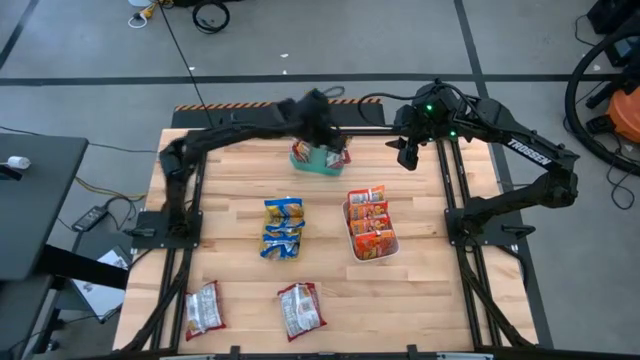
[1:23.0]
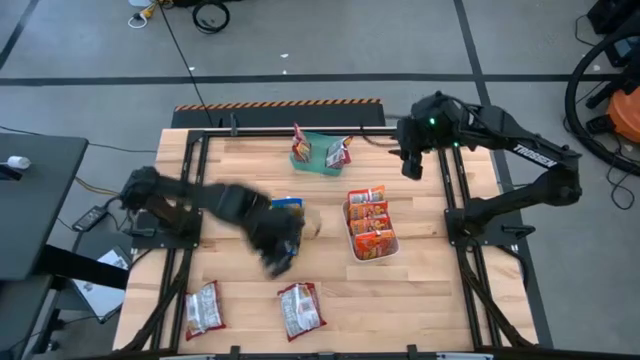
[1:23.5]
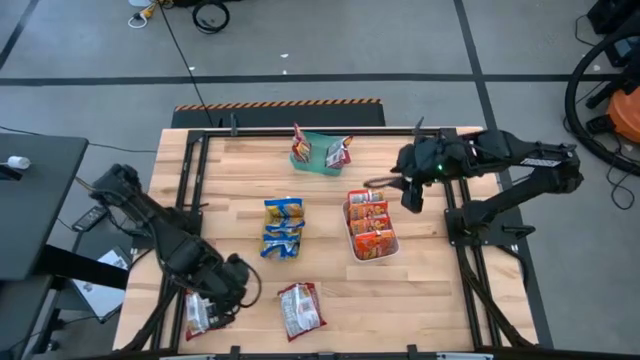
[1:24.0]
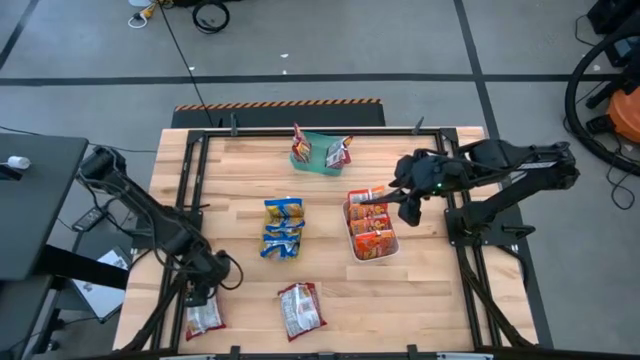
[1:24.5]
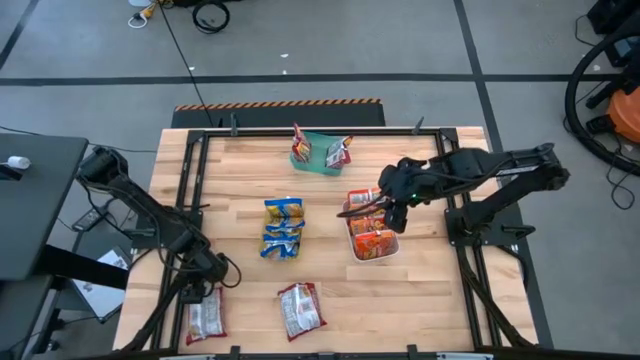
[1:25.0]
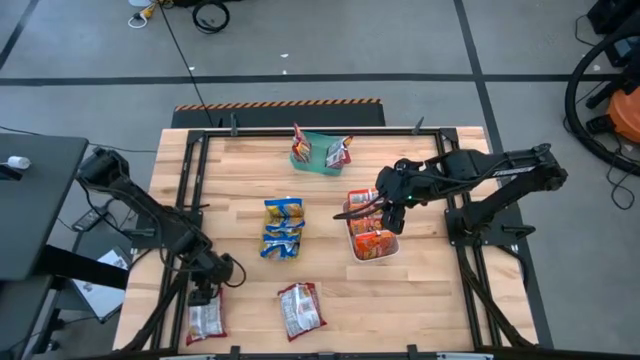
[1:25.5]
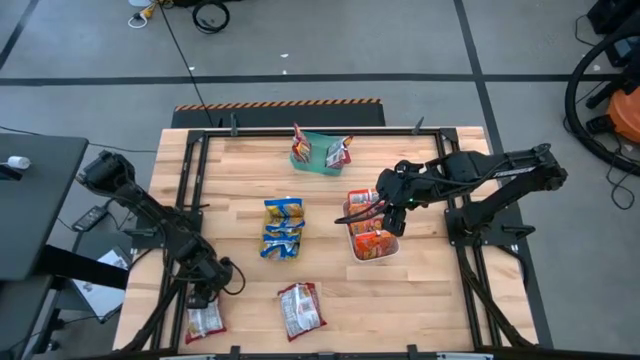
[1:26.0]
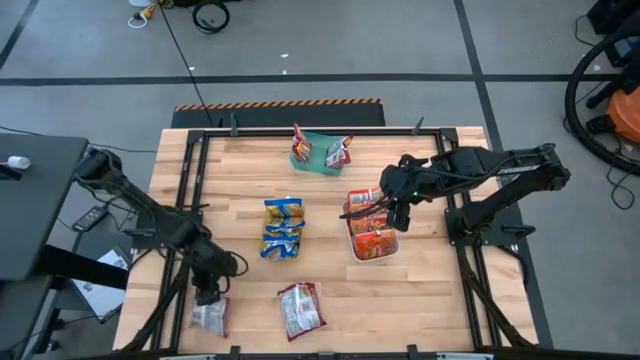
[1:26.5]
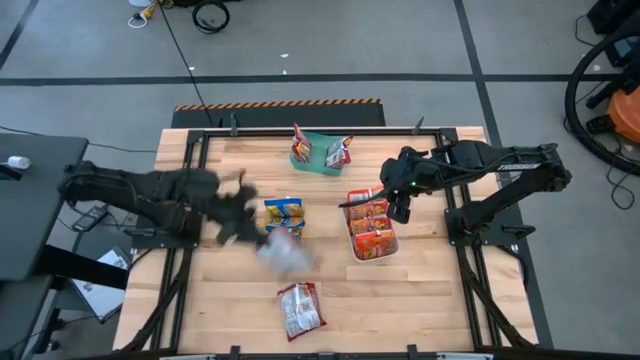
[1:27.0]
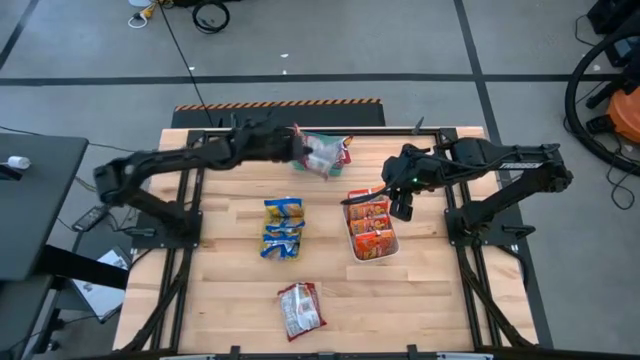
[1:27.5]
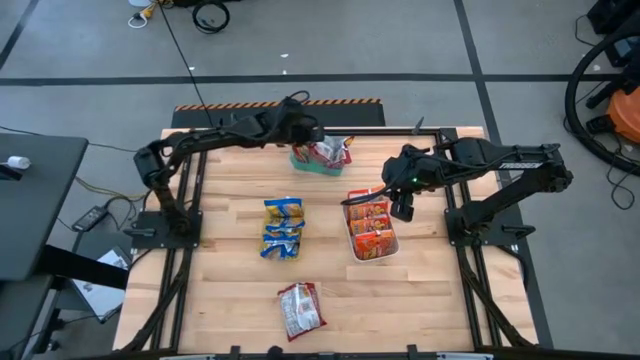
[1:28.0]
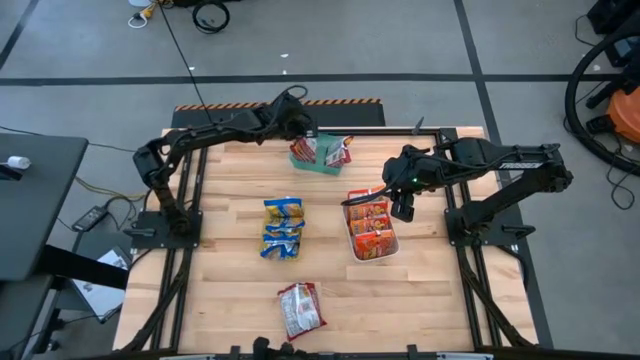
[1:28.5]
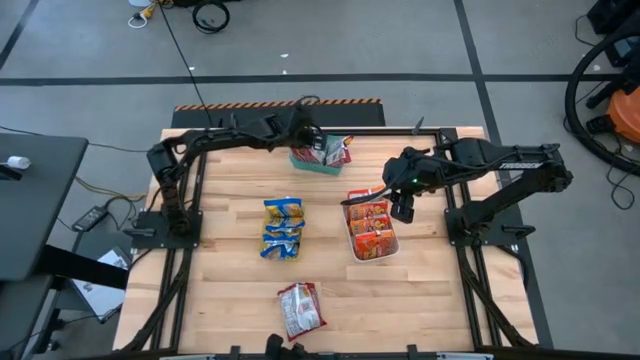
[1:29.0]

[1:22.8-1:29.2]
Task: Sort Maruchan noodles
Put the left orange noodle pack into the white bin

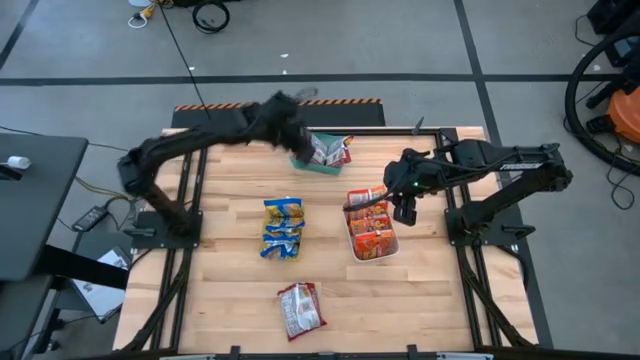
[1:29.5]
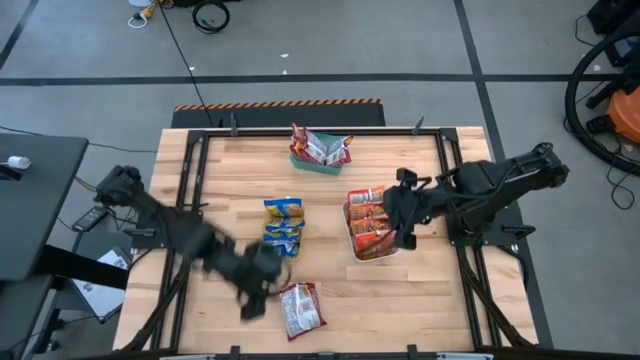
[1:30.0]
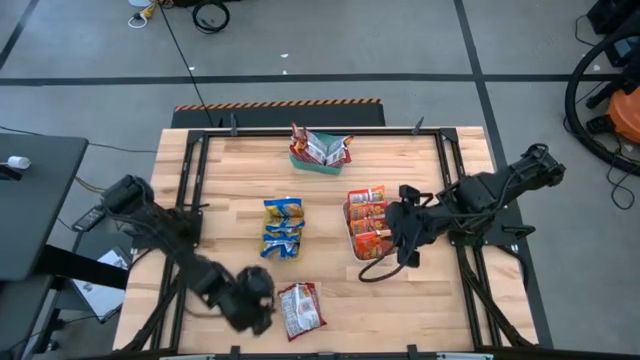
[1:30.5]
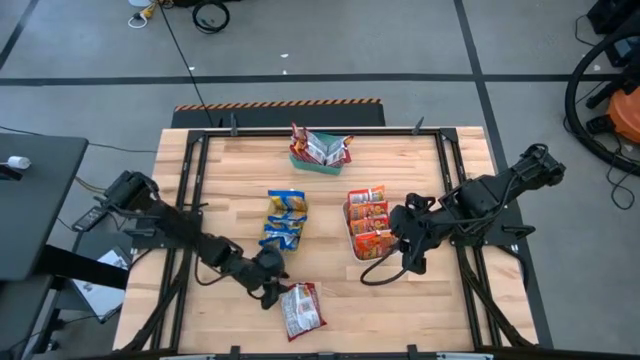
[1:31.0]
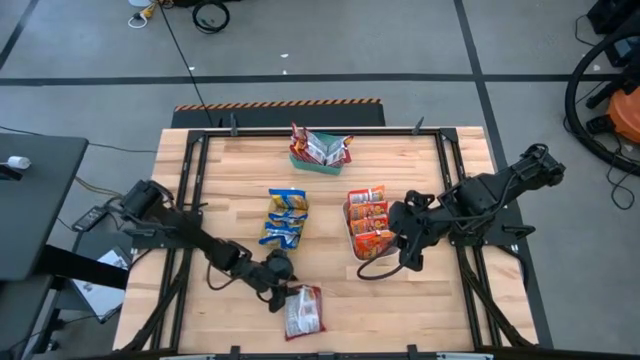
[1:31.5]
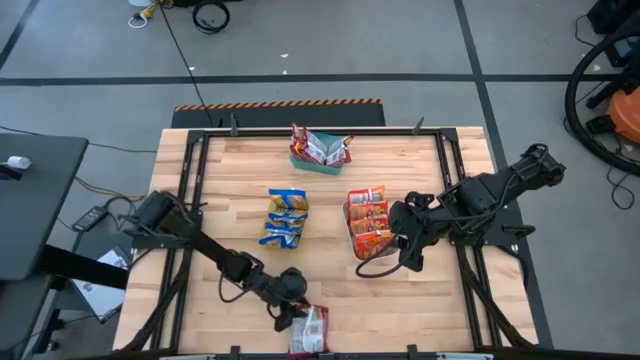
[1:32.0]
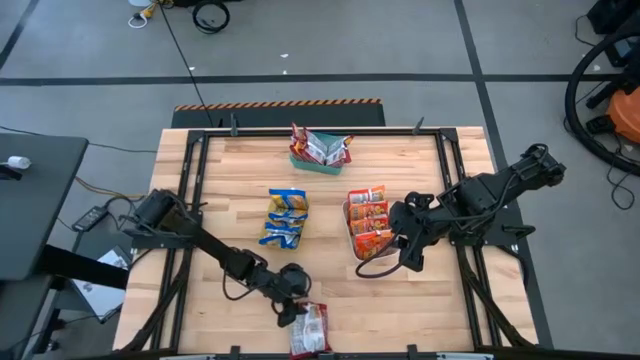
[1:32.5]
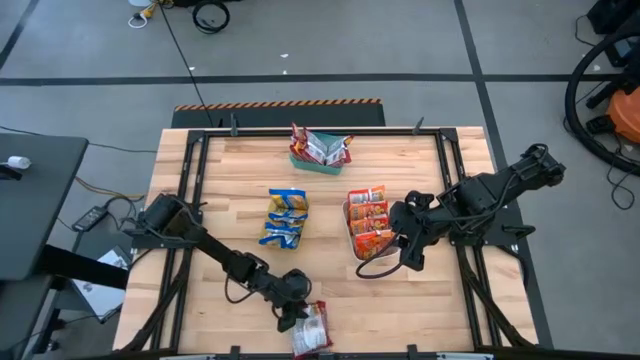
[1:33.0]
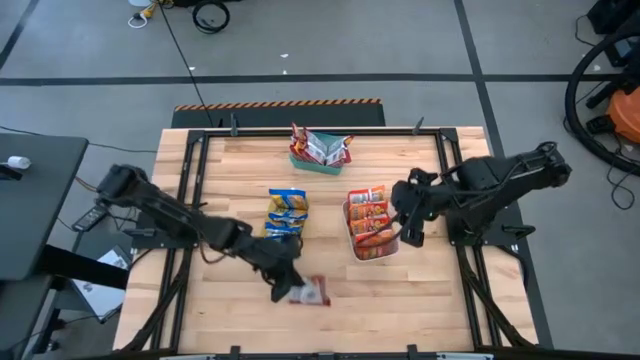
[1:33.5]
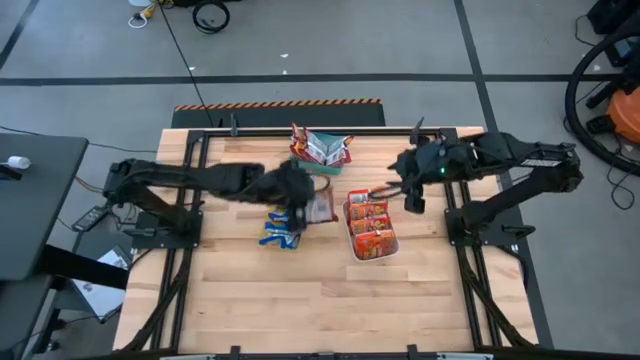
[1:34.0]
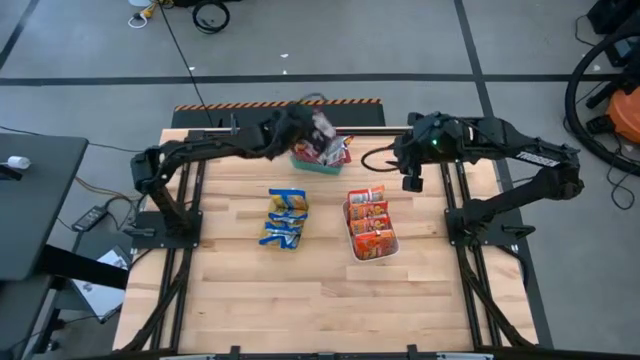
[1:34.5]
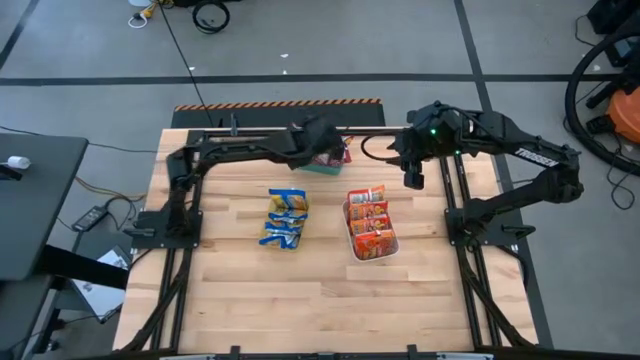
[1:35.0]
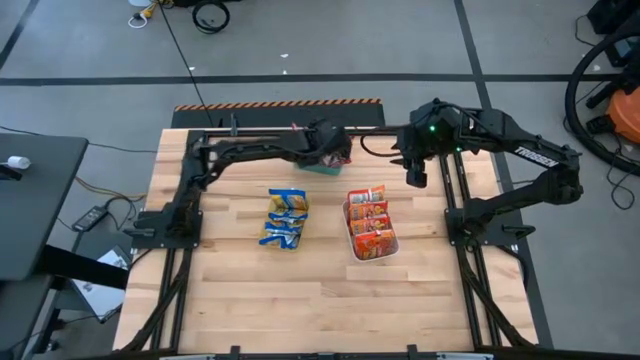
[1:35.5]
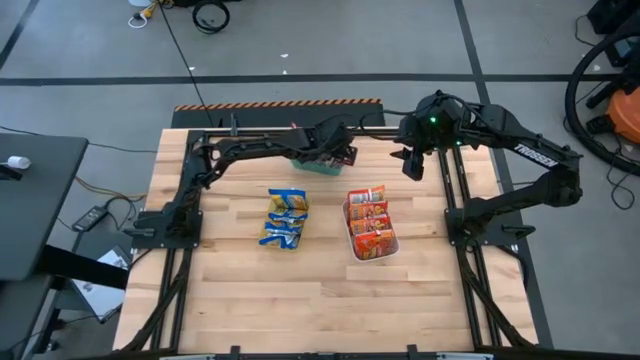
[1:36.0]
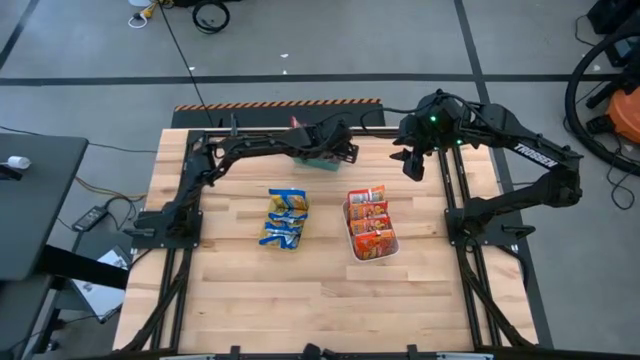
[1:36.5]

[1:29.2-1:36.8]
Put the orange noodle pack into the white bin

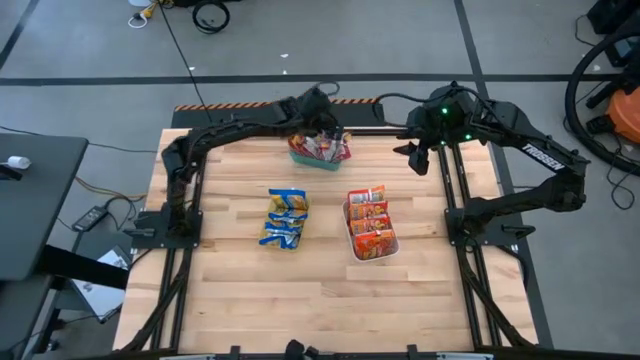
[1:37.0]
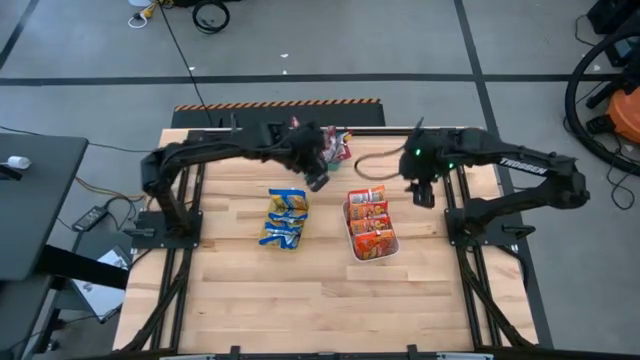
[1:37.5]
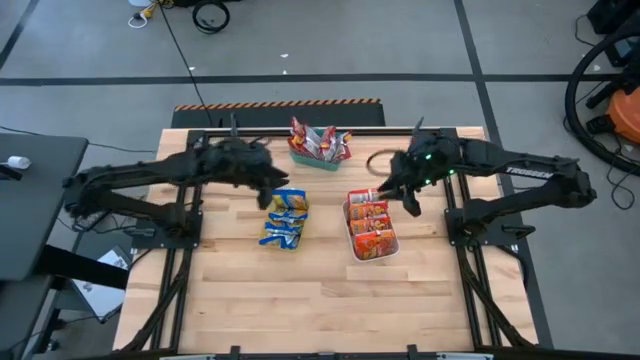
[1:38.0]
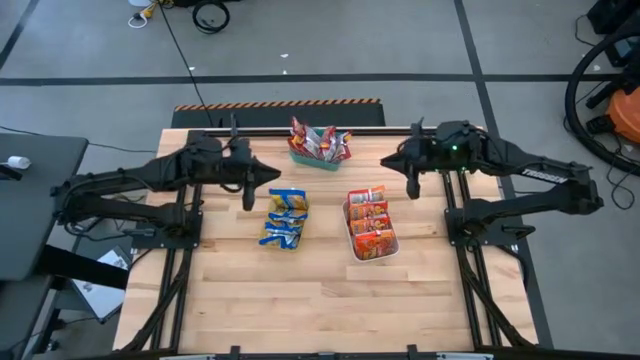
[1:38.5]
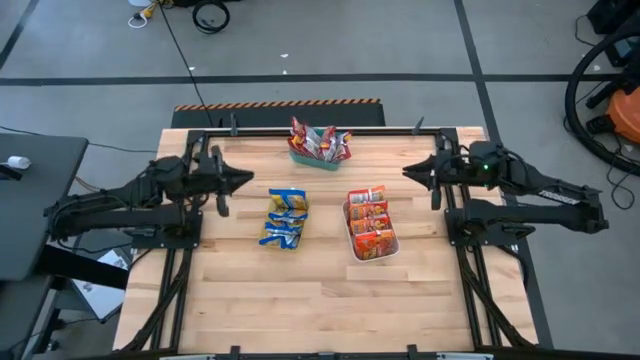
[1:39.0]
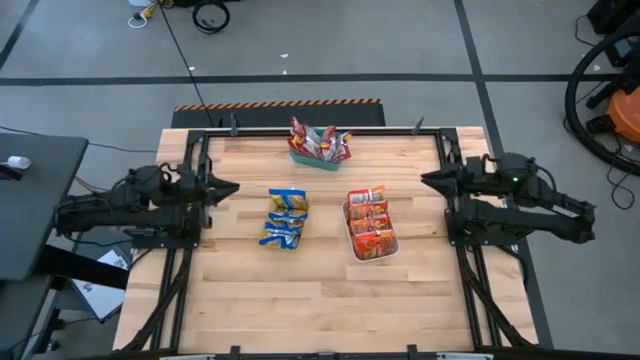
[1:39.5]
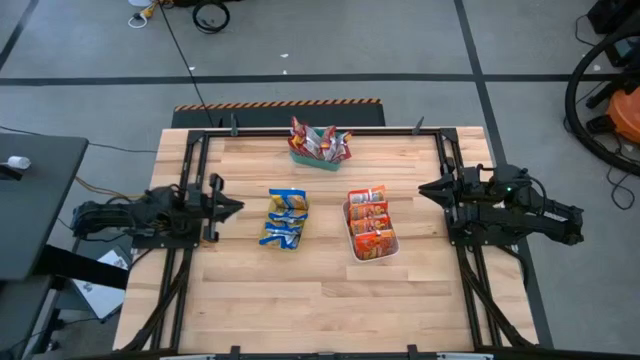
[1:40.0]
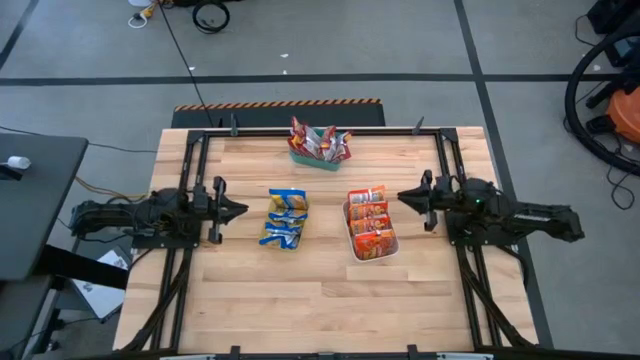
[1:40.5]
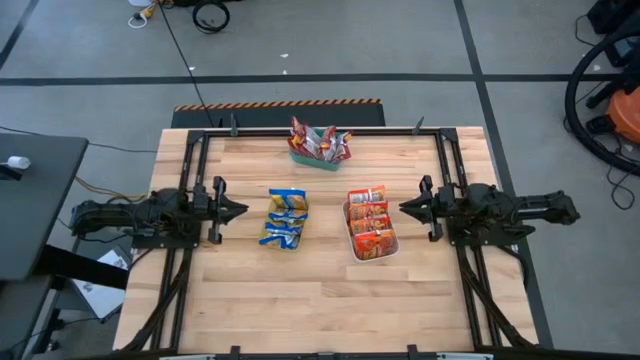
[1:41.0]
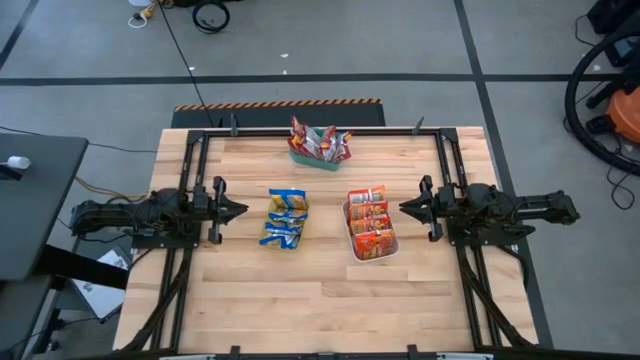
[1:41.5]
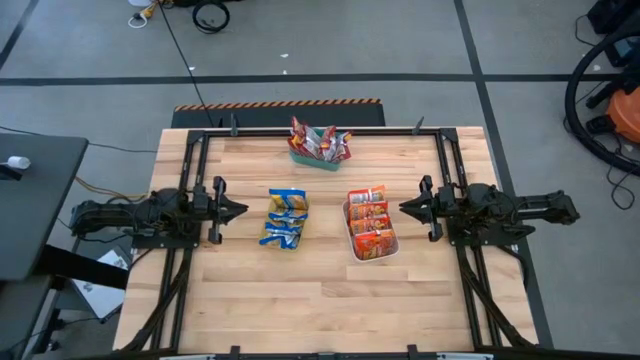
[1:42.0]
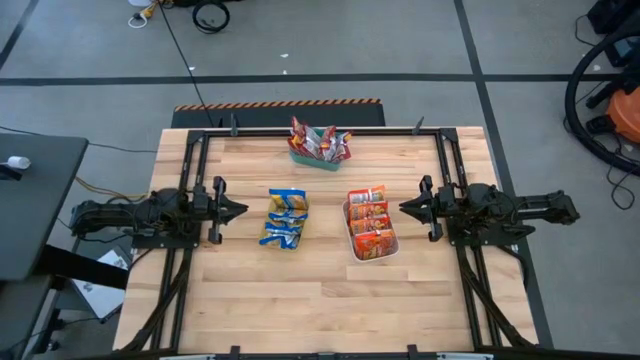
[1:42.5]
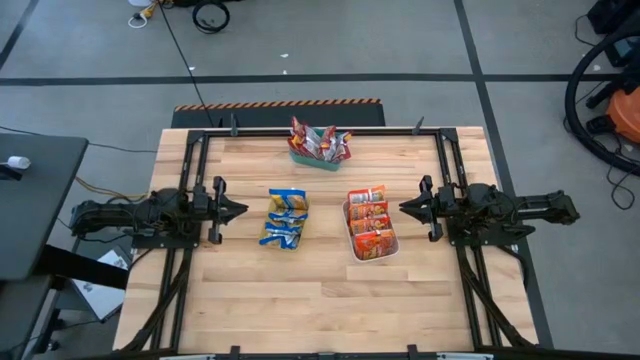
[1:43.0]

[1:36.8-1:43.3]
Return to Home Position

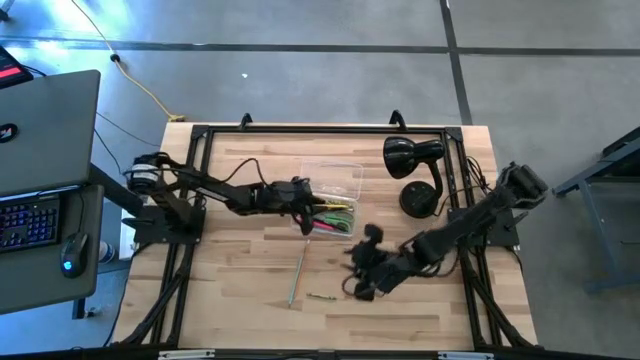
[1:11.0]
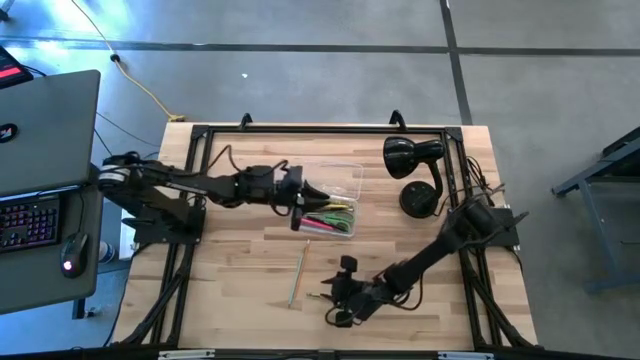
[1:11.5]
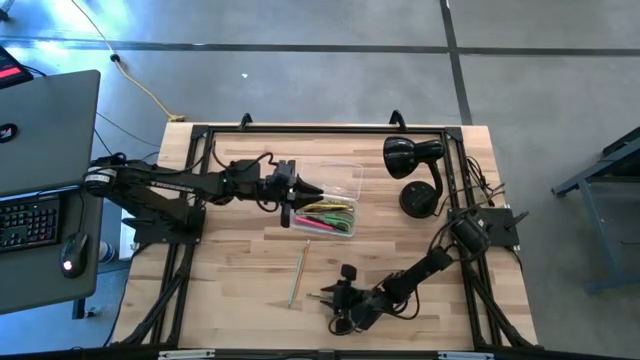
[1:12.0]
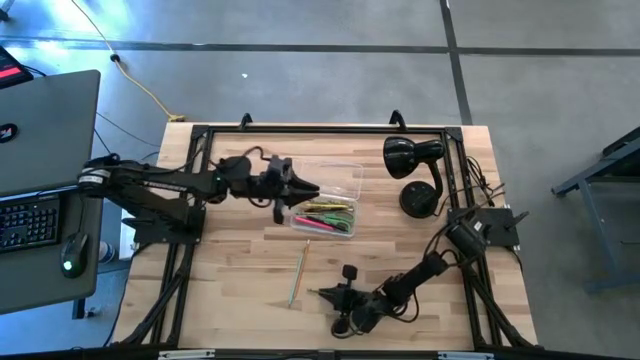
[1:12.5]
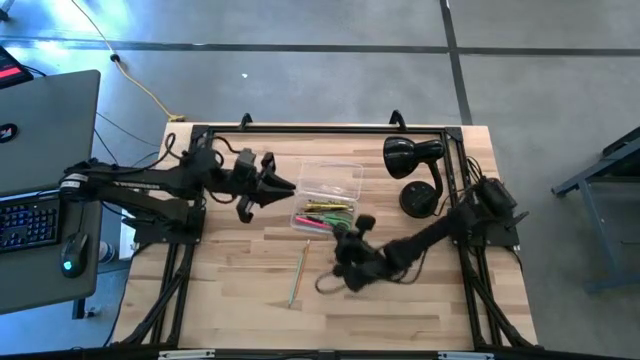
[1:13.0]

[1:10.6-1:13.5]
Task: Pick & place school supplies into a supply box
Put the green crayon into the transparent supply box
